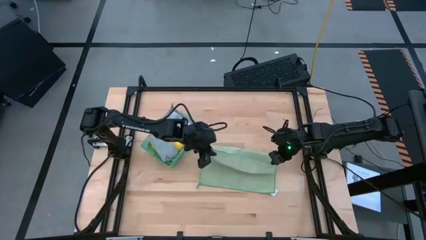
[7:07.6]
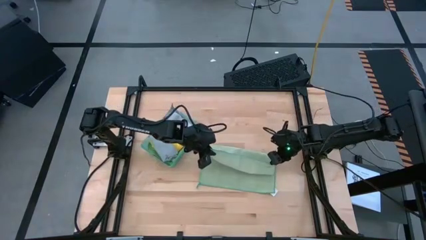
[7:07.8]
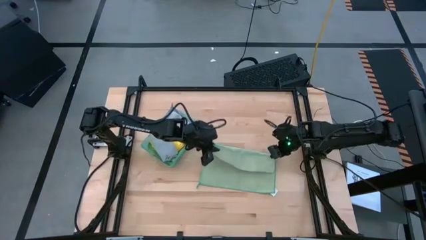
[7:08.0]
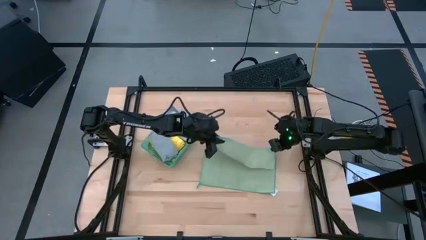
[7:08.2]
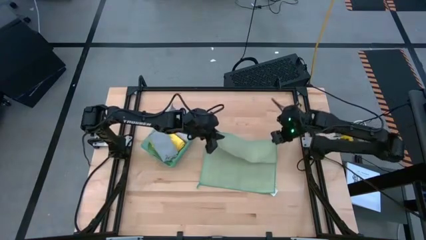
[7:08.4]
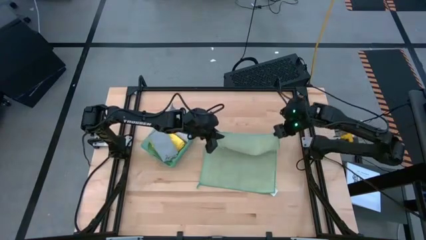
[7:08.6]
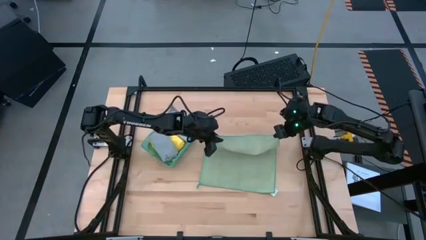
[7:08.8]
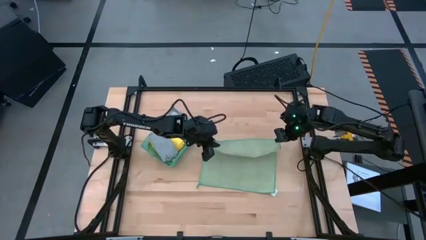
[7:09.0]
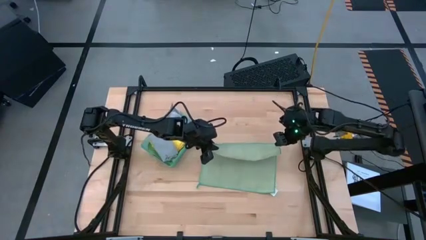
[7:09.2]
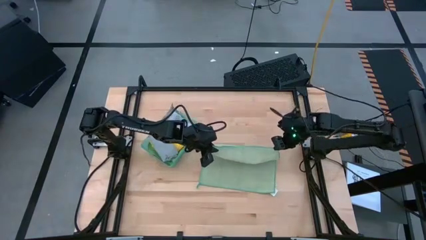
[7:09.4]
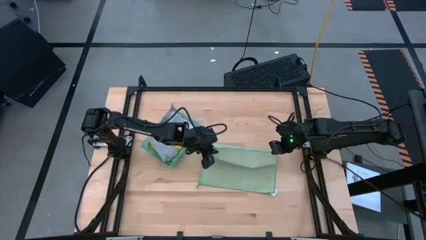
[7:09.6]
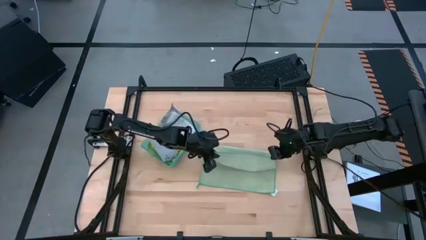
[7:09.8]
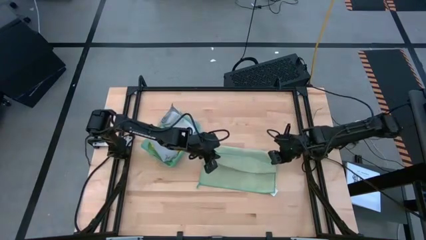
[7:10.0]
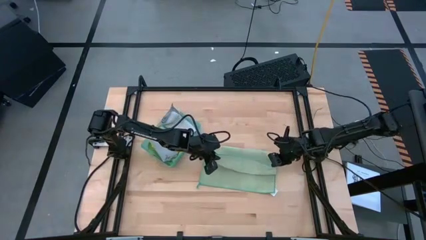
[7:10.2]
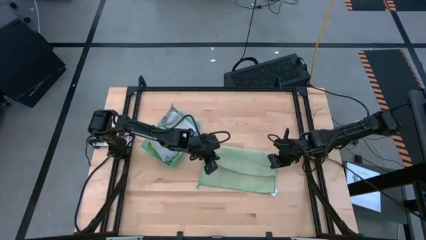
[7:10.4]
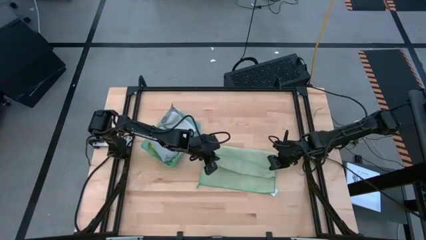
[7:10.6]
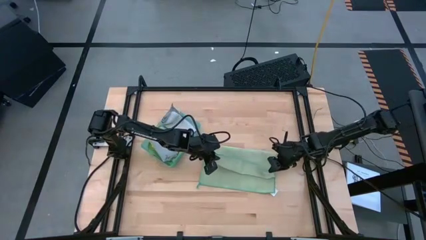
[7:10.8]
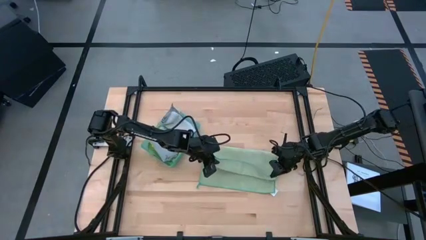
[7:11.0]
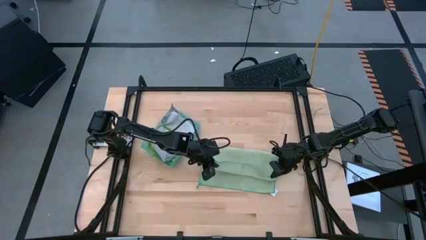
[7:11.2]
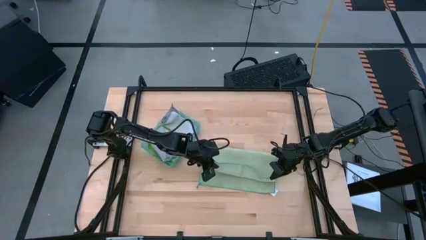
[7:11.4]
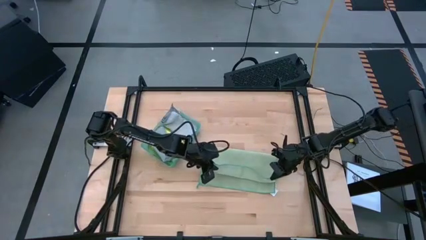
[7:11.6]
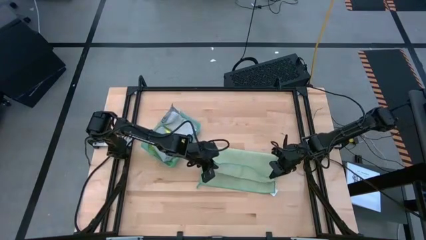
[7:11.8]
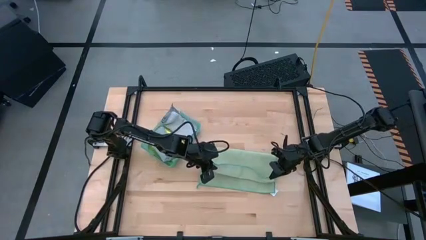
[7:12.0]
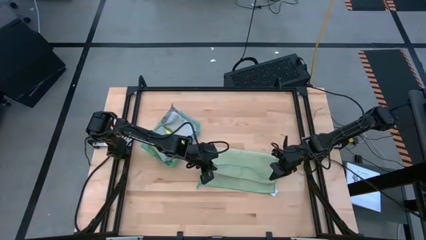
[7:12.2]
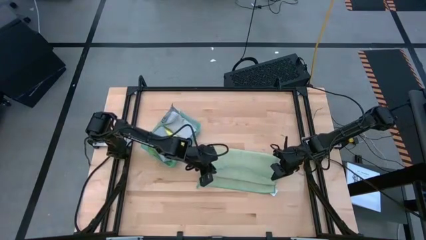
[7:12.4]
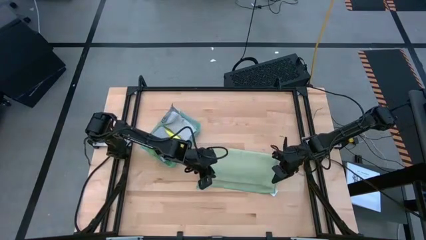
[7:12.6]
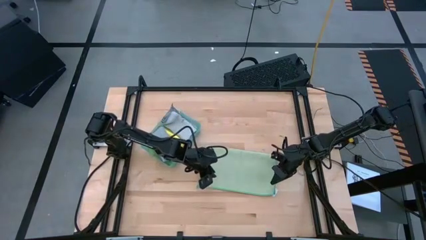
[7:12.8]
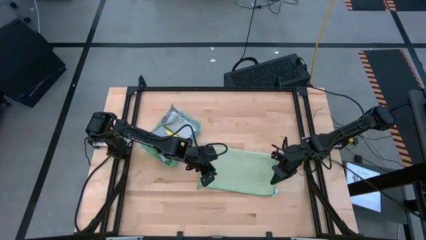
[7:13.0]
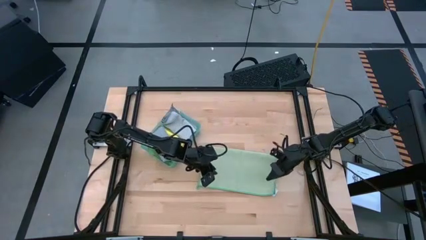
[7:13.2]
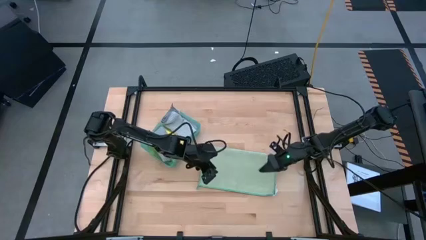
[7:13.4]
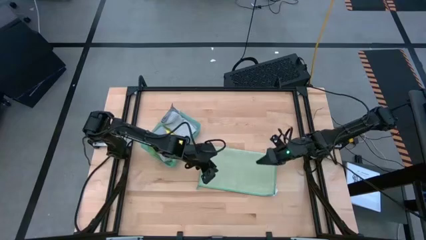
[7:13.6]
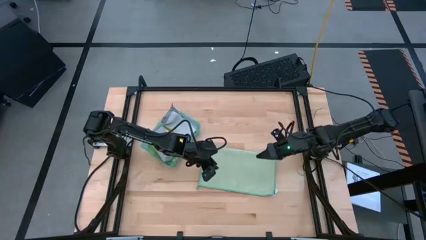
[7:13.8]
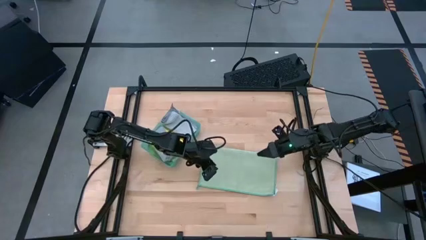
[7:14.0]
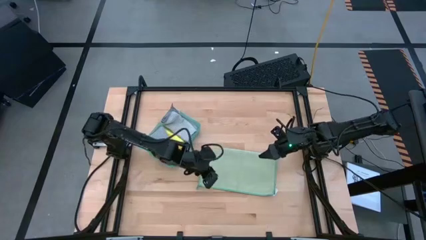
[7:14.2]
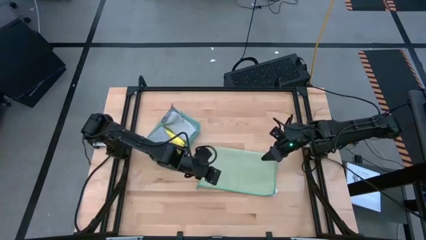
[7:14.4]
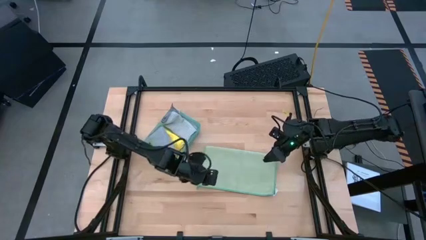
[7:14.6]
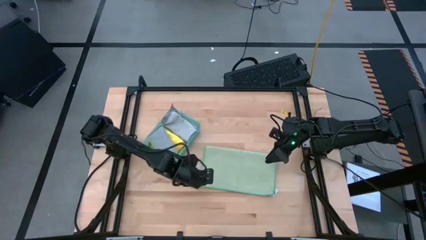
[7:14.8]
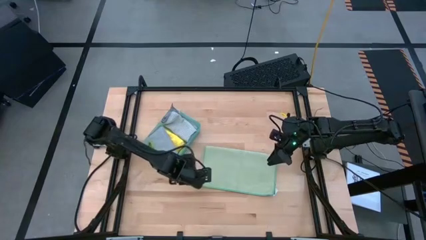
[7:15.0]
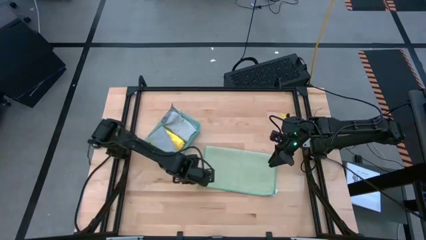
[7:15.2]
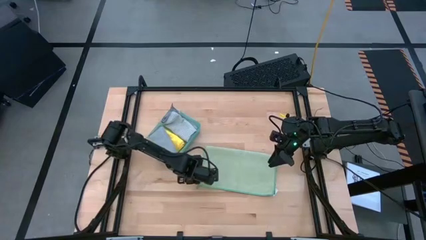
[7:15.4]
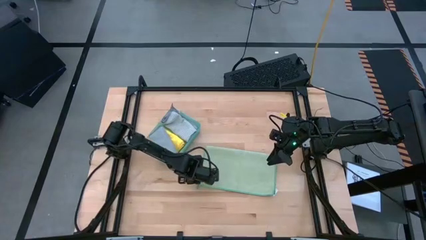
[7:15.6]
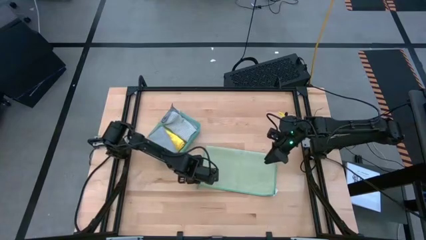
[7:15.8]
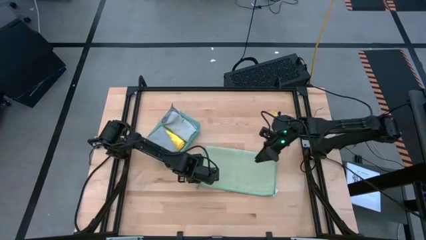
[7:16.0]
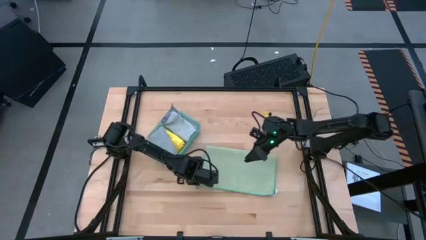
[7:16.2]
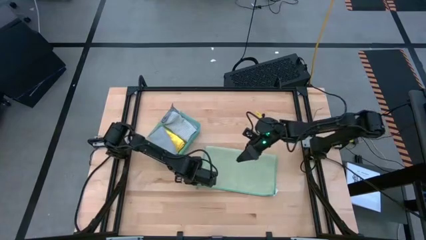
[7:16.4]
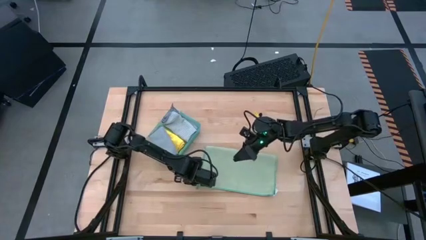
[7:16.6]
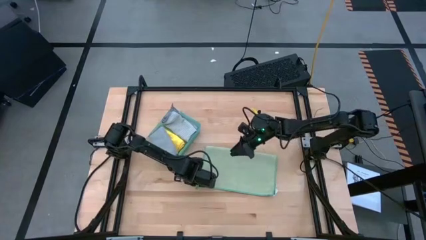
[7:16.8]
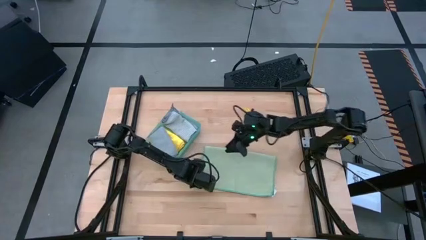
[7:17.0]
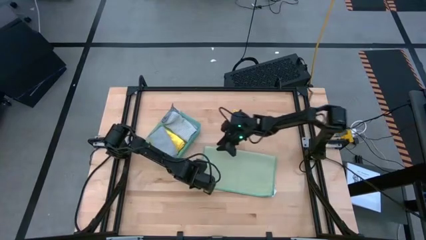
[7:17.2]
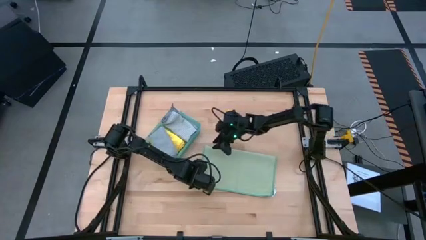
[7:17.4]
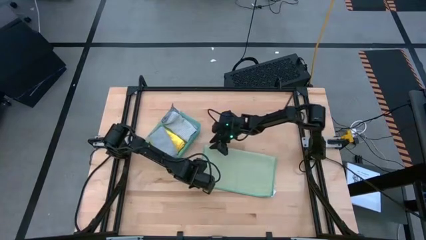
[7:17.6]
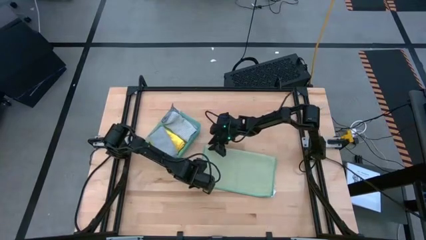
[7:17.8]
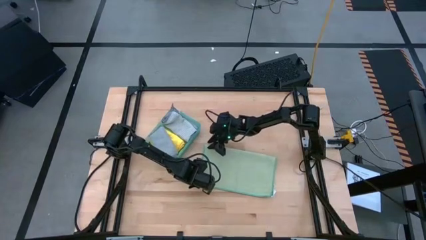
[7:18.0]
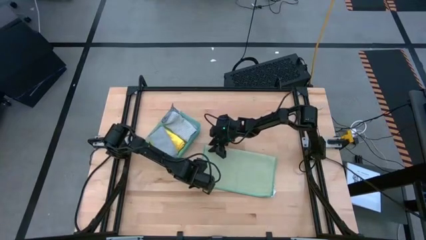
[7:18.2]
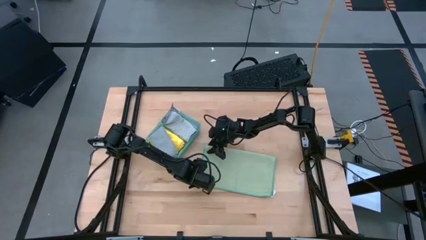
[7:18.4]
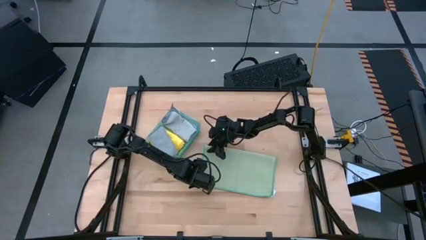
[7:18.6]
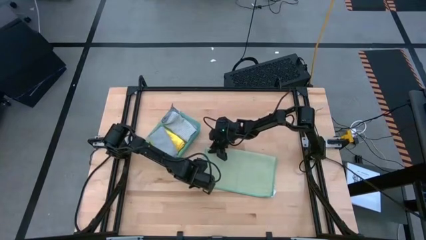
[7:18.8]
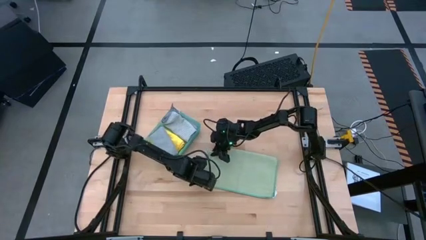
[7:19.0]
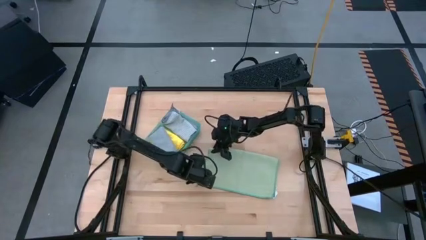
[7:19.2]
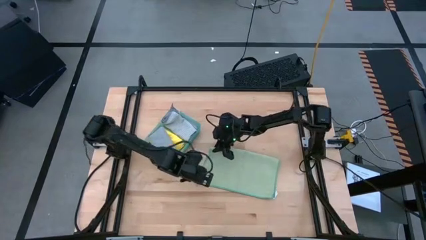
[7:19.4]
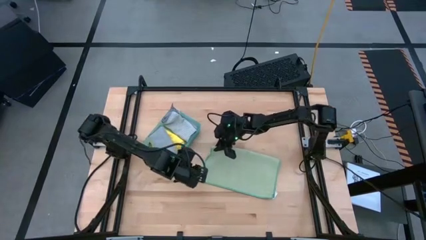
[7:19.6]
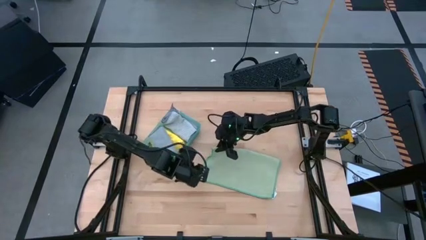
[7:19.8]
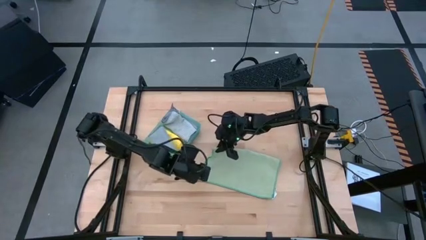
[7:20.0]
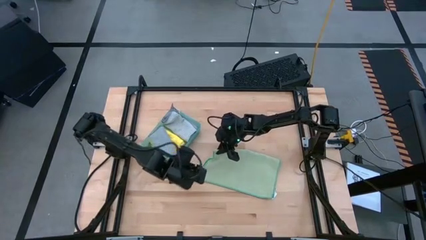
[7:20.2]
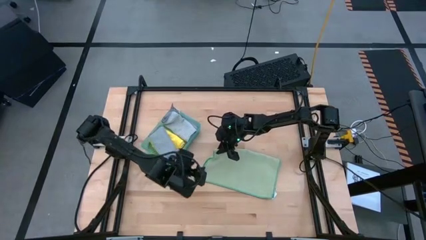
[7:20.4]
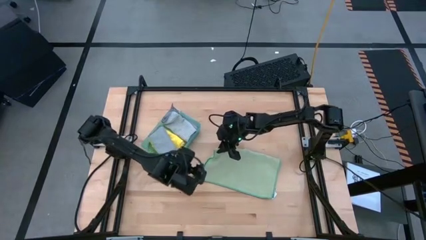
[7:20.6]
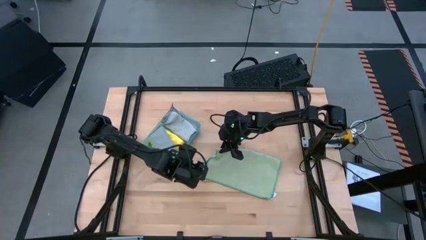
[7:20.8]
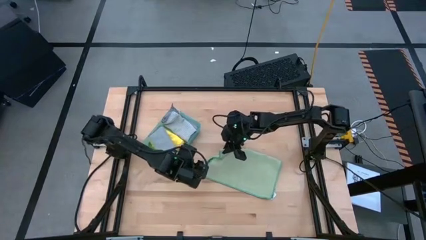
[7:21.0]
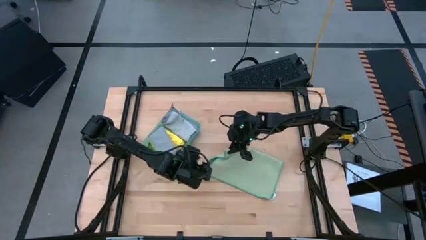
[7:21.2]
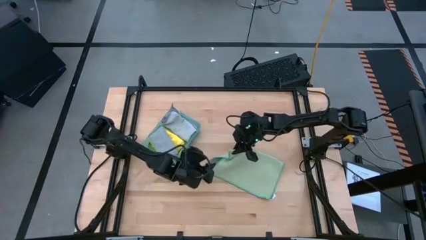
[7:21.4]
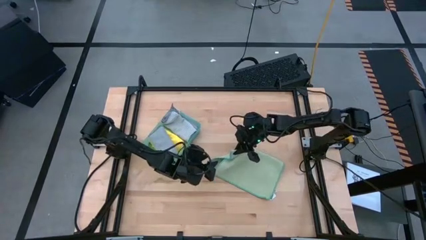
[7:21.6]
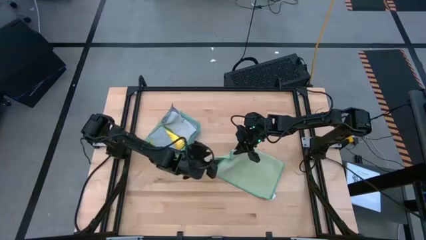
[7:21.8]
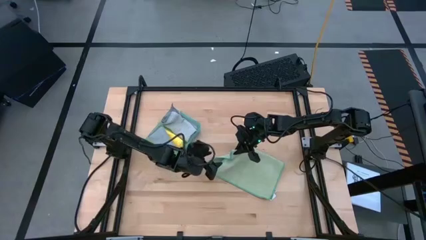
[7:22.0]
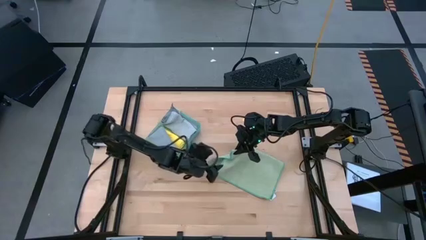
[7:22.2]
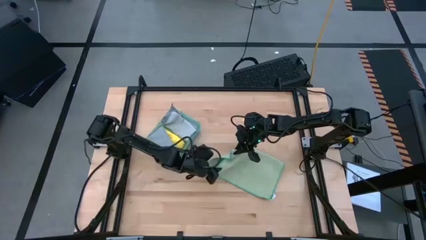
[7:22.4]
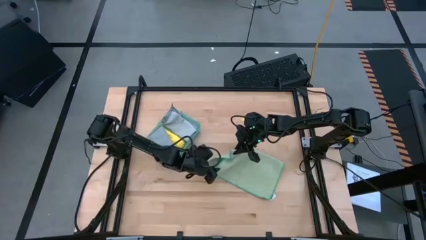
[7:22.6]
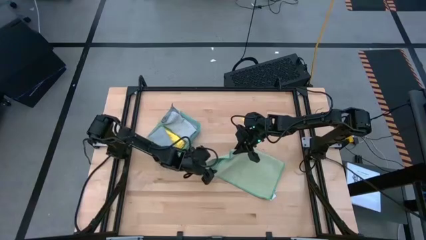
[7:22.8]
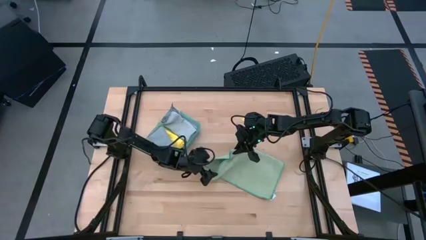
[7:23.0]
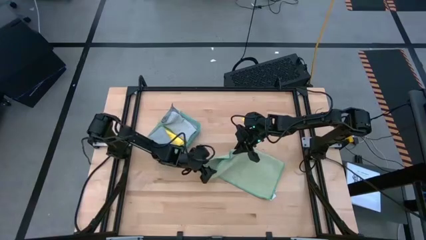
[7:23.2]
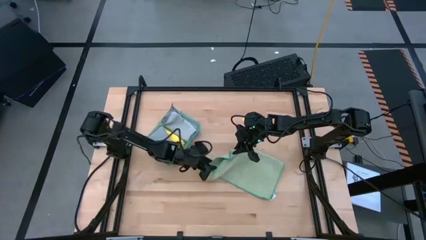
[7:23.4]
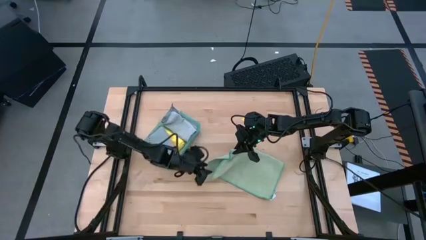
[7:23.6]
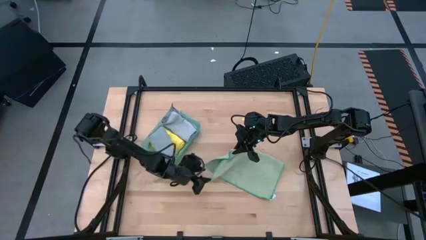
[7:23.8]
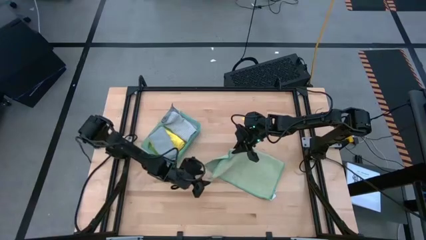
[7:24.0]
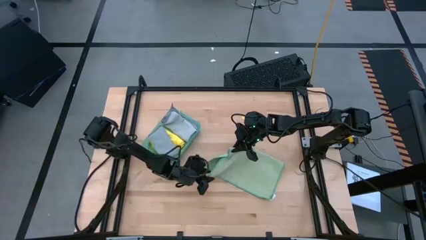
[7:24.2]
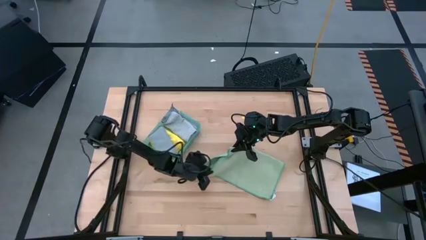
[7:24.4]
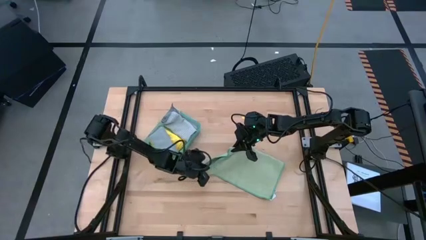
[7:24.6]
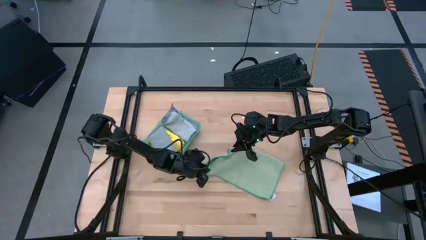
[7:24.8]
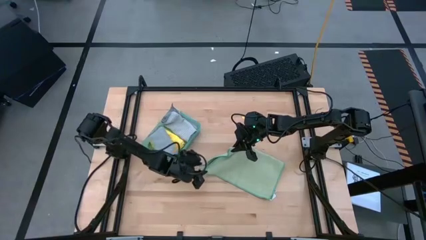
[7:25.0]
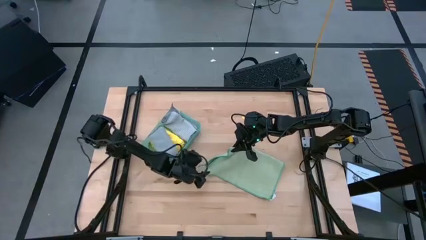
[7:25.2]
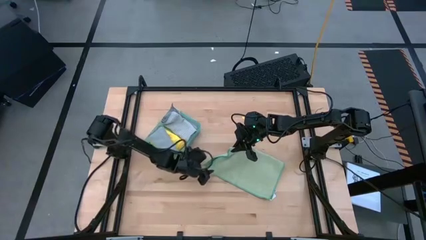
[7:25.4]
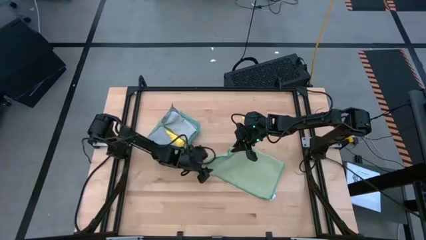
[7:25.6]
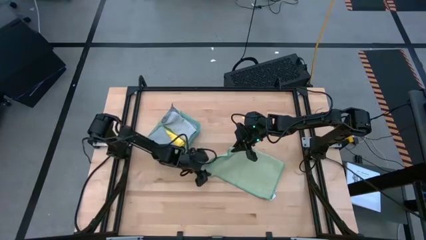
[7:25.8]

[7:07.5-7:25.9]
Task: Fold microfiber towels
Fold the light green microfiber cloth
